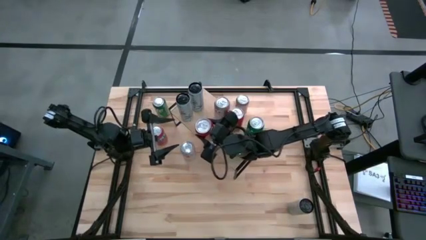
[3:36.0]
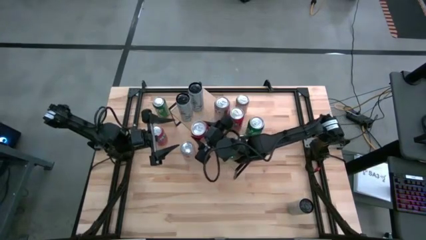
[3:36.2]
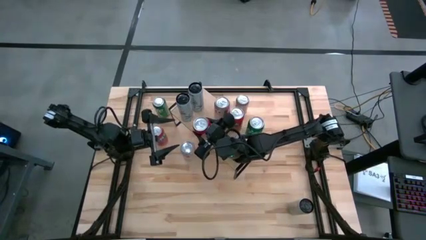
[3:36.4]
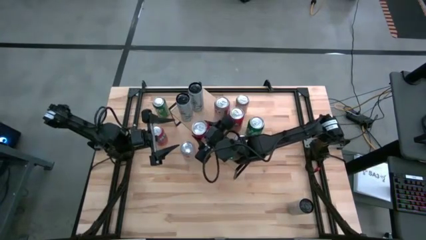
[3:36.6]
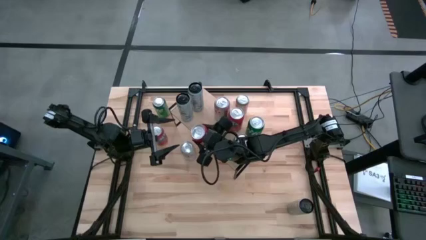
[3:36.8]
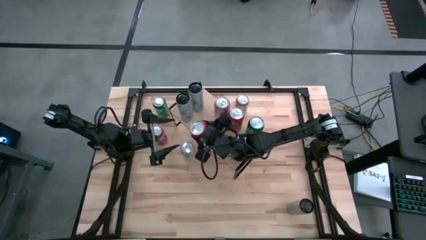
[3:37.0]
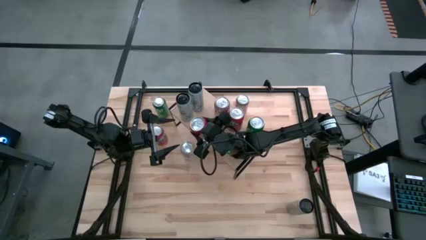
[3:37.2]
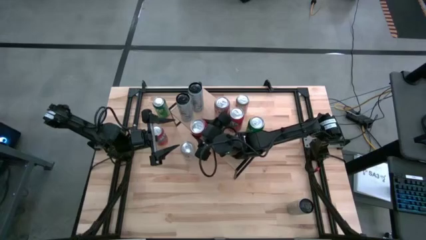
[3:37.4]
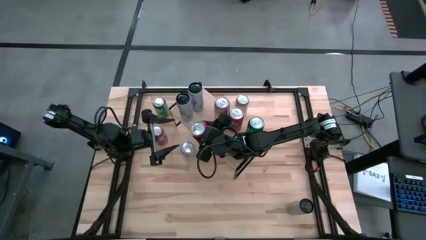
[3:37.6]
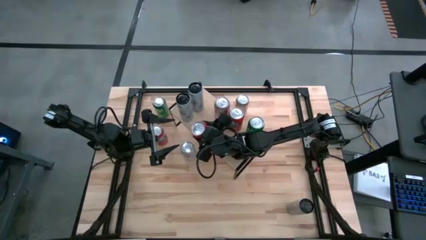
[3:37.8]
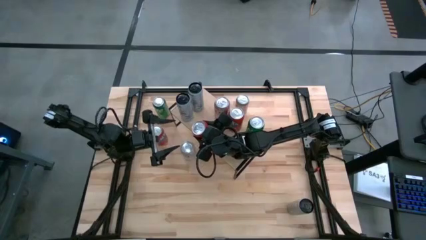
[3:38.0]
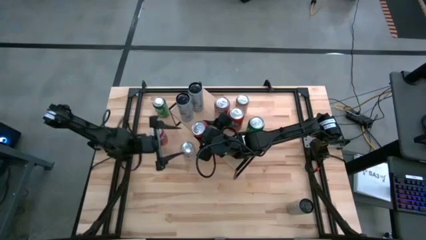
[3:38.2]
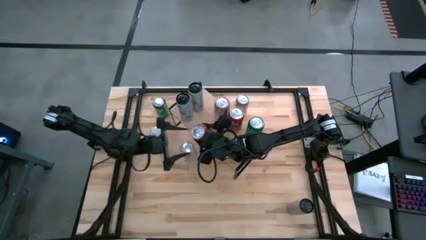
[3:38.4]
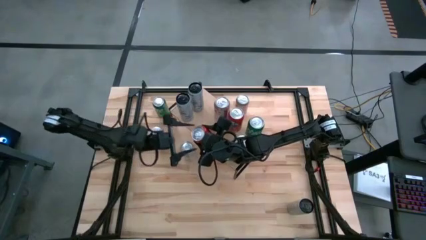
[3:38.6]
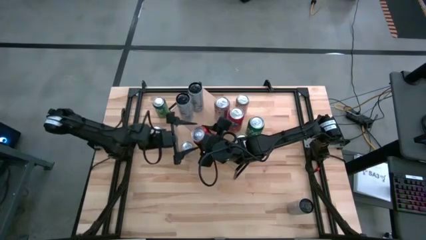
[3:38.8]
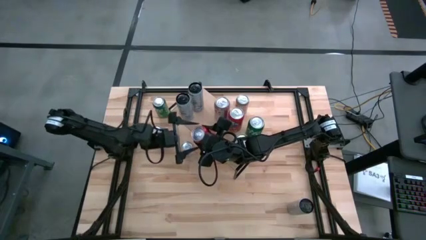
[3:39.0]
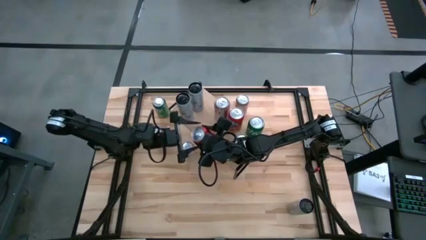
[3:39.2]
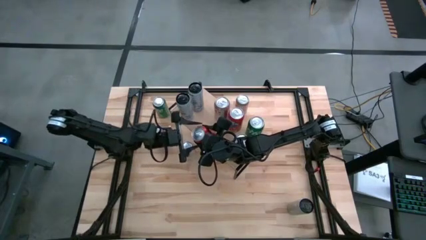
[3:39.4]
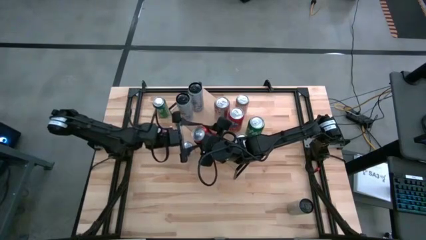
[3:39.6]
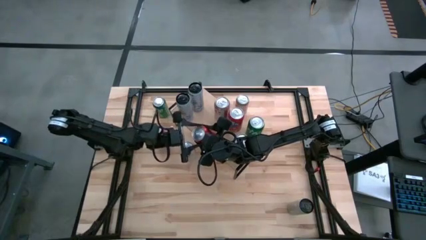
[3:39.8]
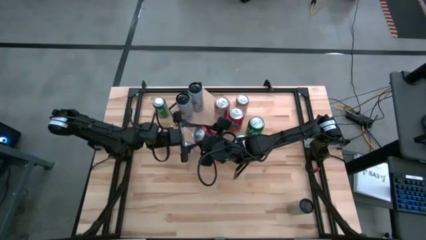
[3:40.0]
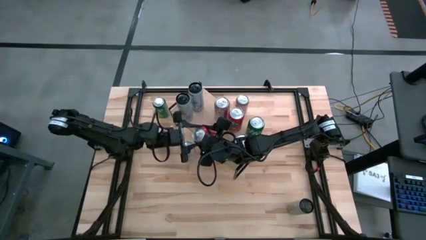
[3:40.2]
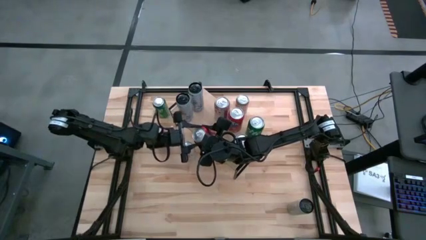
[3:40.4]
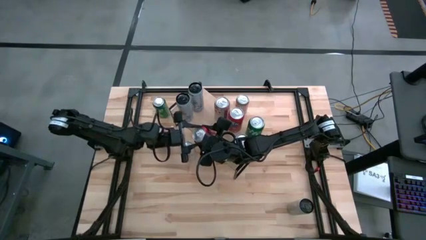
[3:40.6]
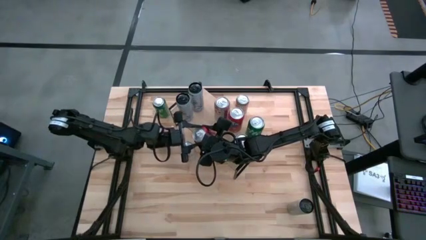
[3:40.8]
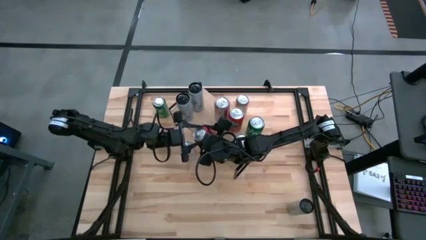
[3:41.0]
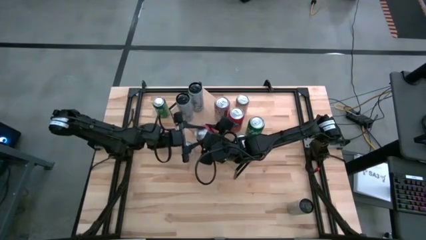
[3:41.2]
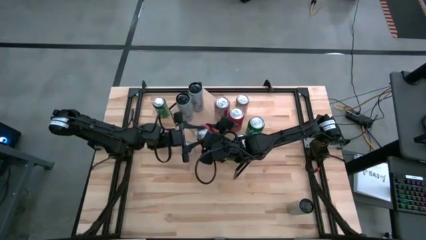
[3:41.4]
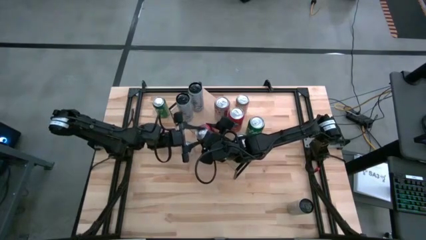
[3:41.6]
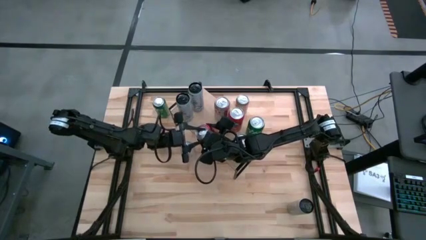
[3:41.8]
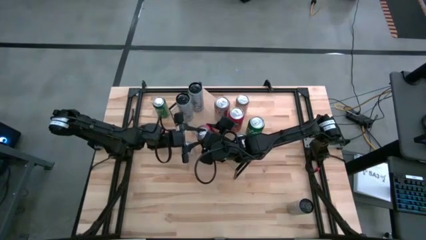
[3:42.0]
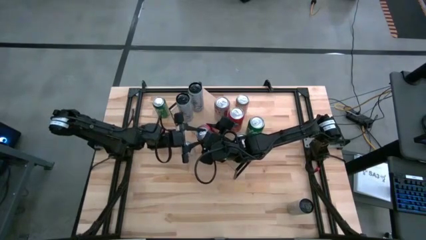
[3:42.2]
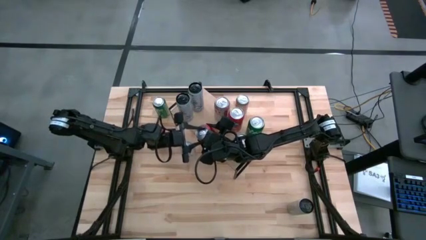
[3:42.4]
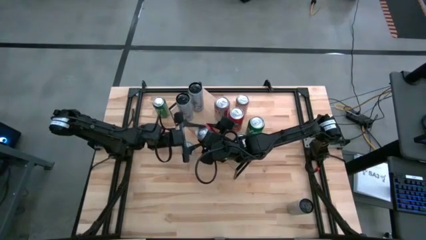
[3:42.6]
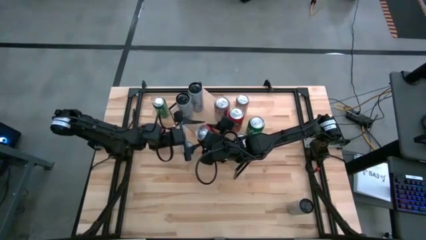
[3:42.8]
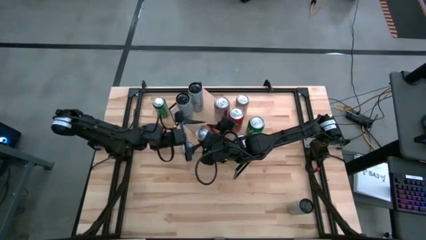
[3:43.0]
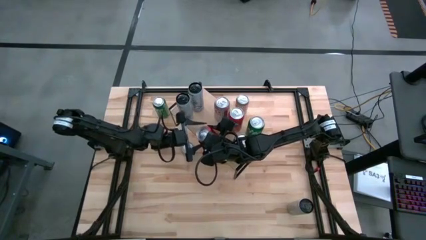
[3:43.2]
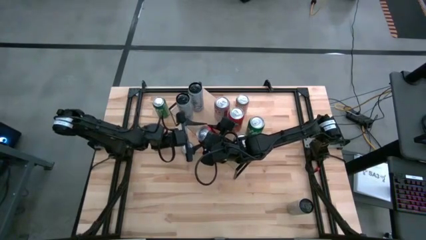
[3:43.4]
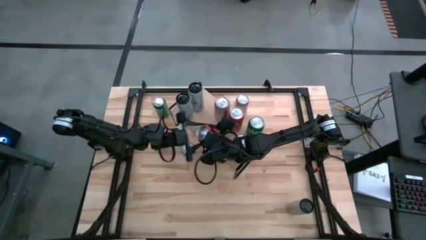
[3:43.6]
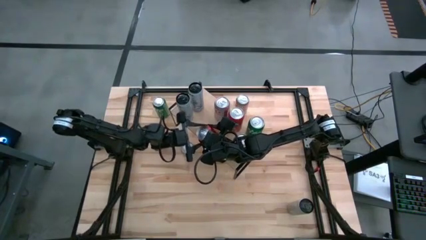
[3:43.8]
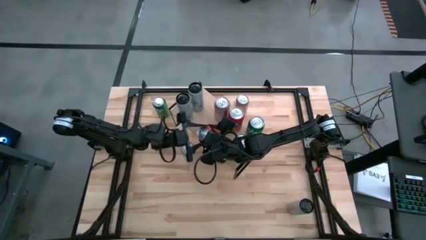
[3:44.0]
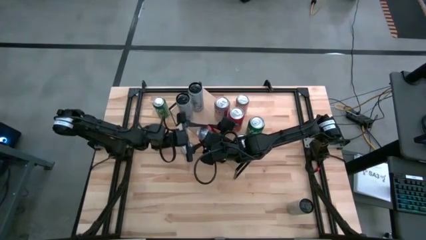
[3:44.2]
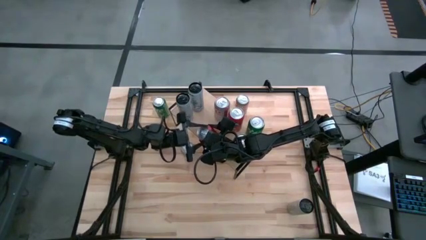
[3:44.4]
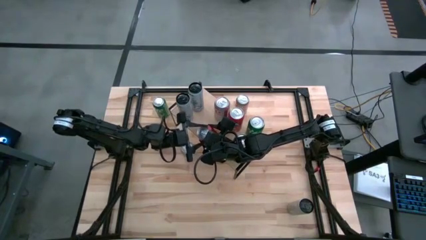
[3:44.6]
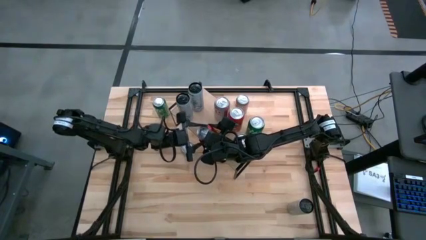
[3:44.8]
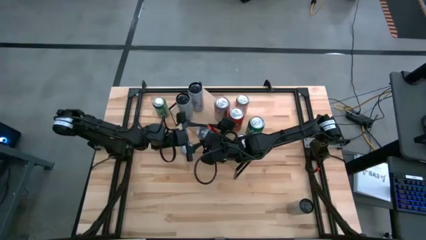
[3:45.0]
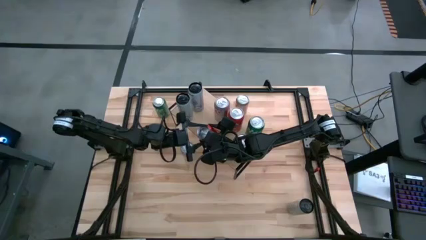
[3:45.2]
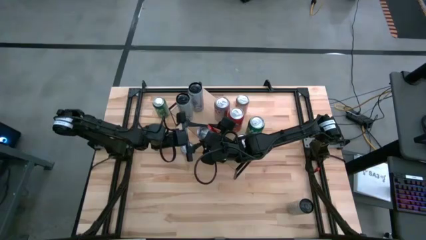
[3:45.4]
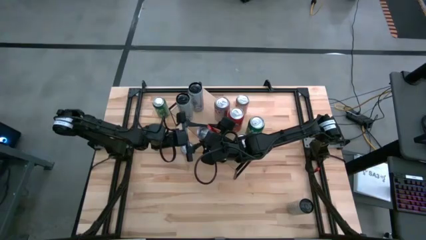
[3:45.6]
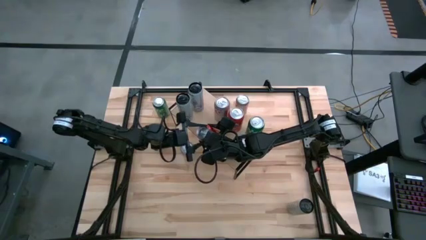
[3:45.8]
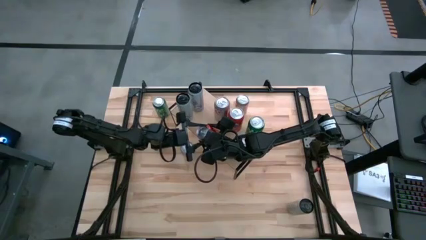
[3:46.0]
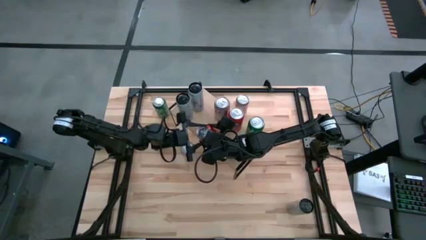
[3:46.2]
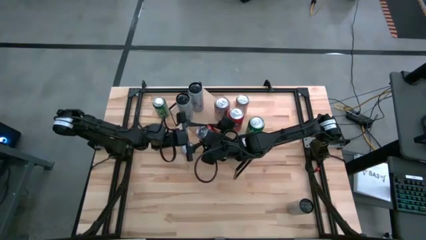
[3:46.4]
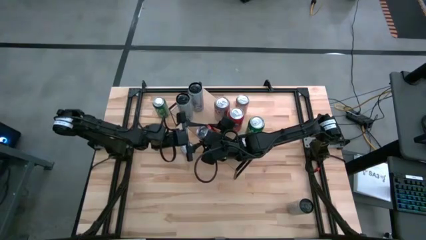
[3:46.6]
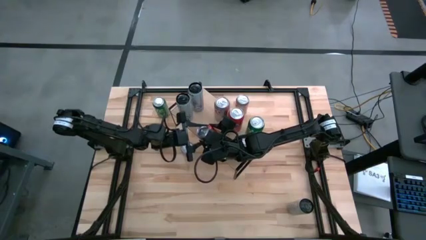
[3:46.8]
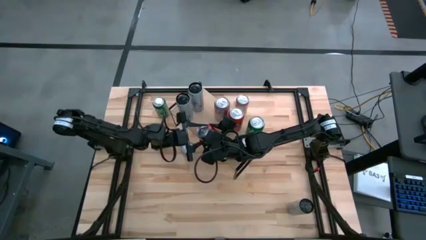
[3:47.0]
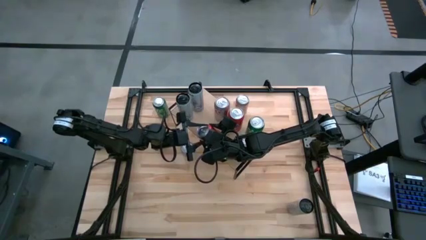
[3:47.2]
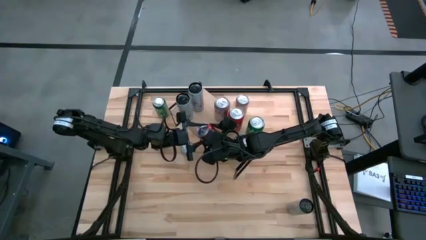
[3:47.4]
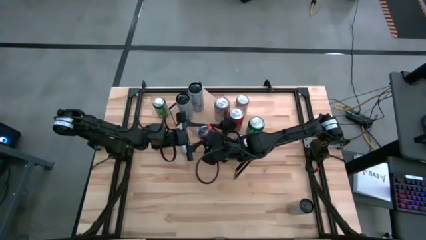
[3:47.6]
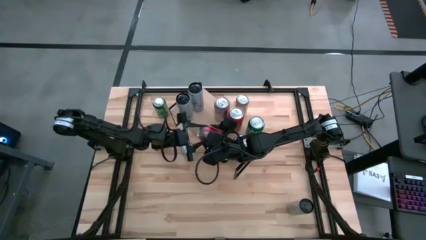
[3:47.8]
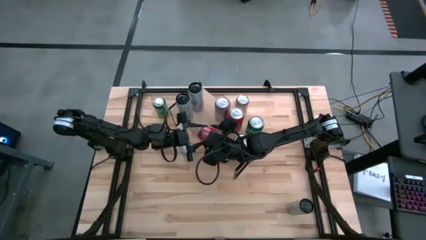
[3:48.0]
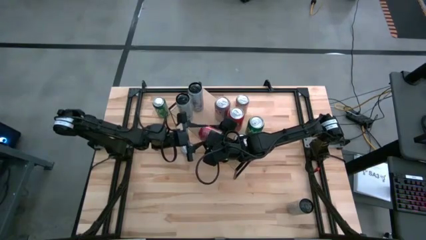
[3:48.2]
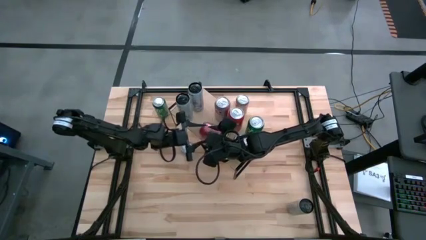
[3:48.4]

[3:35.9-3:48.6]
Task: Place canned beverage on shelf
Put the right orange soda can on the shelf aligned with the other orange soda can

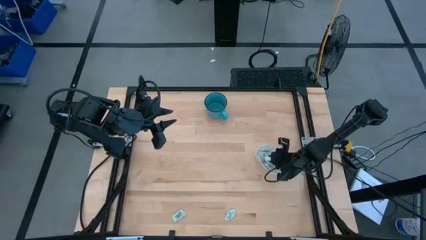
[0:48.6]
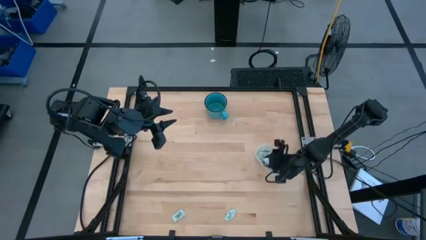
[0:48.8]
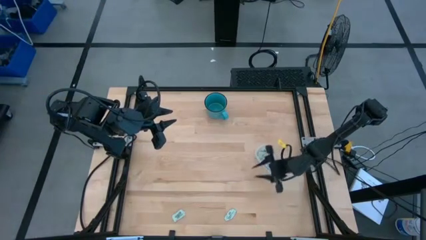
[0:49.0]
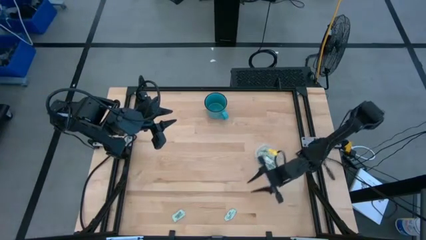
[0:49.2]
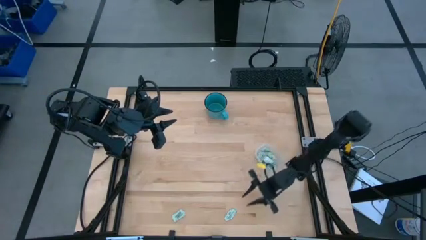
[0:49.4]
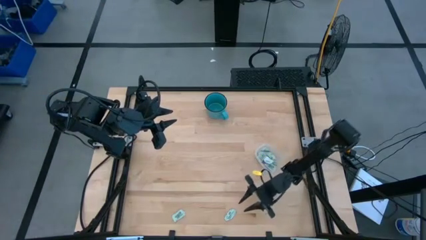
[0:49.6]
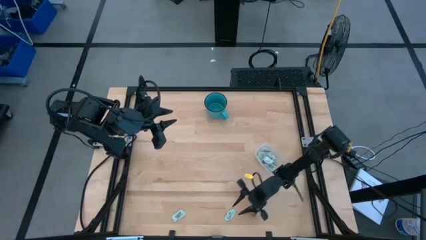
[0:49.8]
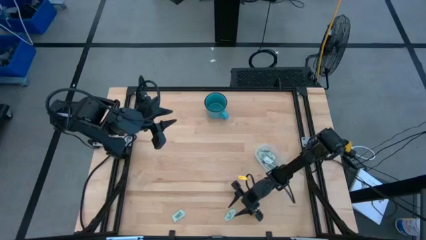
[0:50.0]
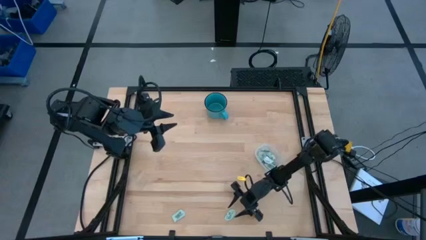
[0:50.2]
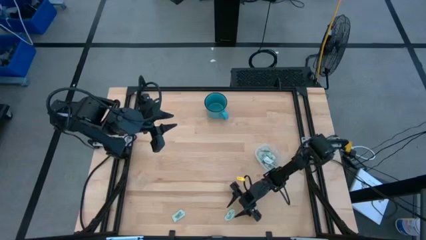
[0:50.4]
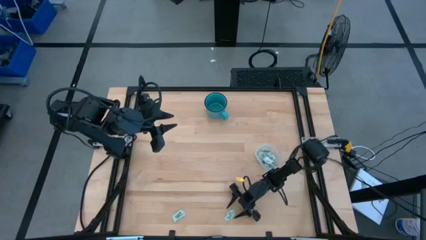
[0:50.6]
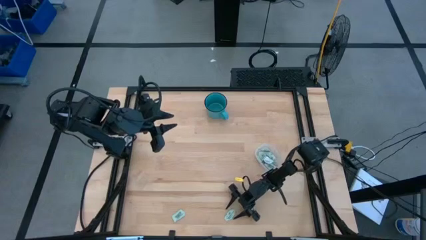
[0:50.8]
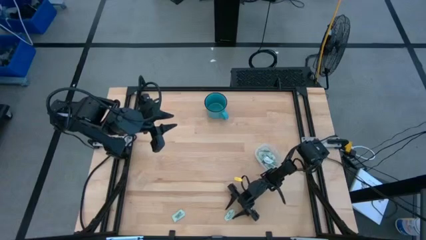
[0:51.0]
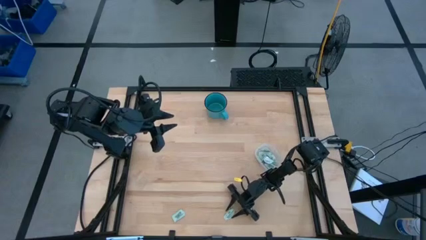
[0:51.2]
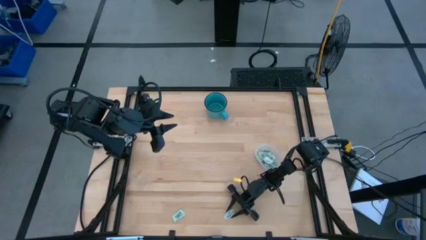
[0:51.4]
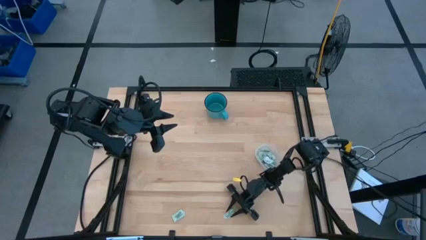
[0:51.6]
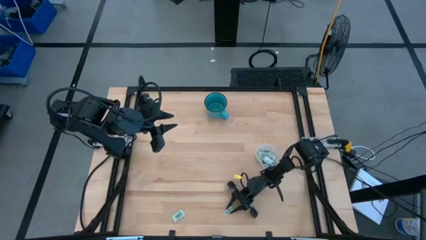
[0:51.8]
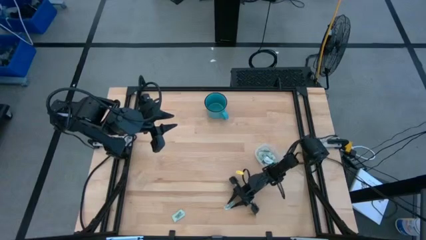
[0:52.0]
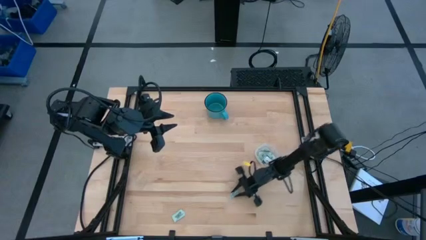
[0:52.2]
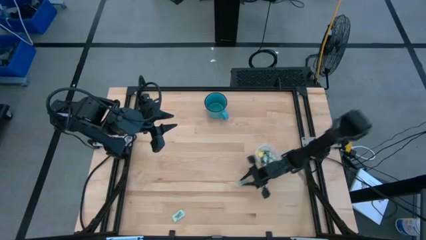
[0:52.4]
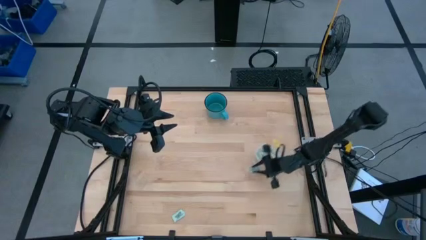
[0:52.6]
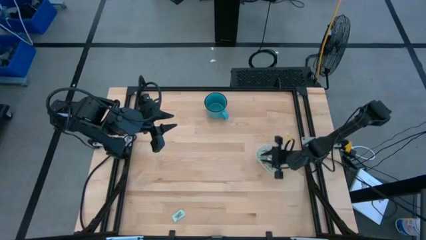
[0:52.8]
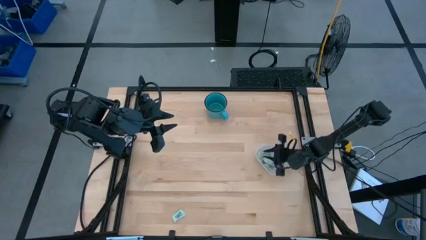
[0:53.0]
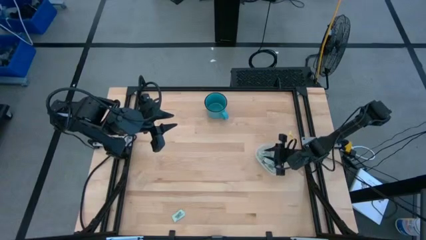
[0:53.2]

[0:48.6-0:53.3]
Task: Pick and place Stevia / Truvia into bins
Put the white stevia packet into the transparent container
